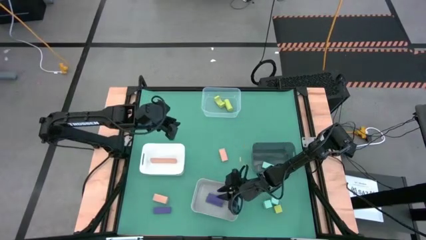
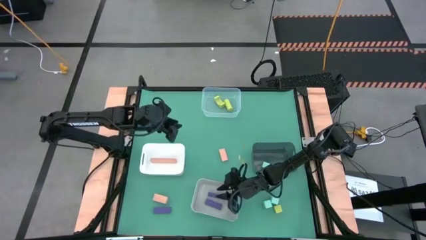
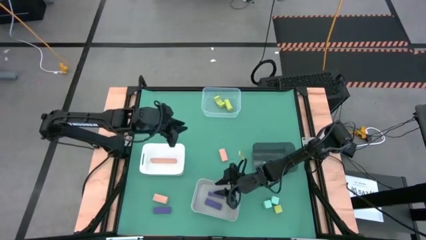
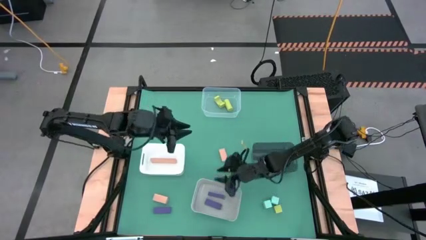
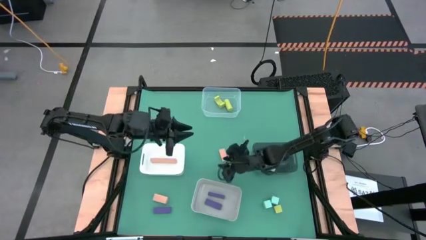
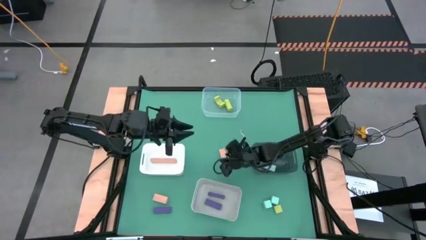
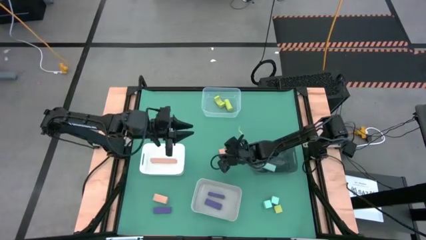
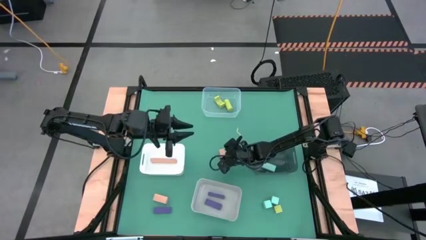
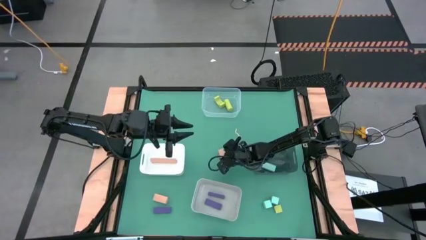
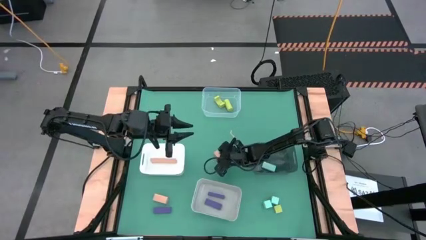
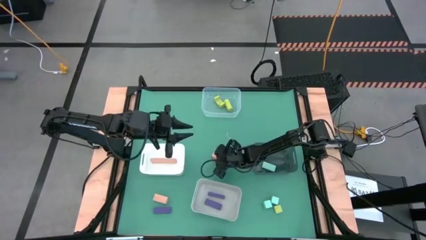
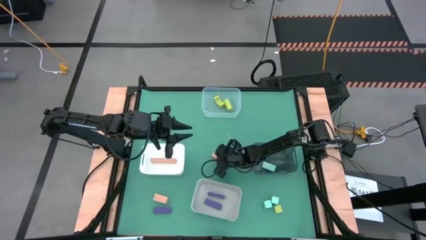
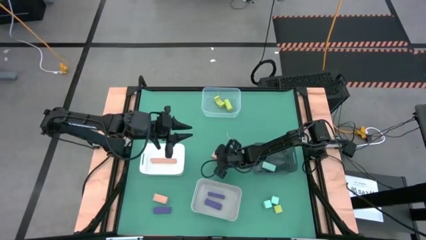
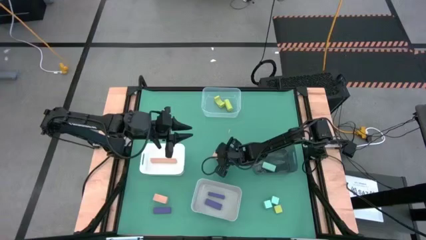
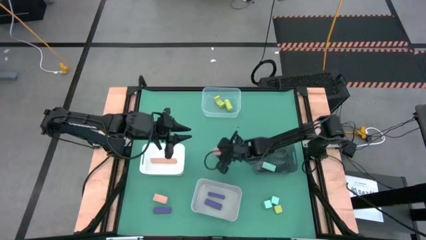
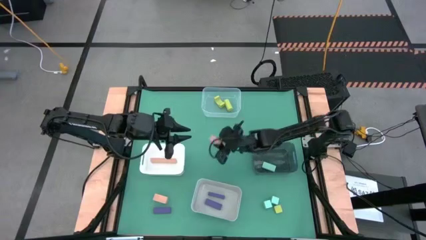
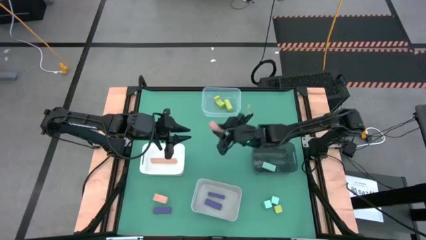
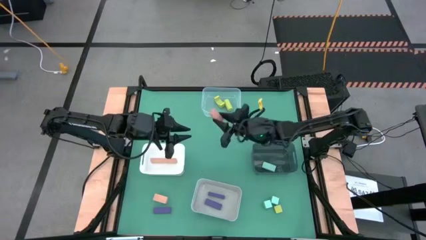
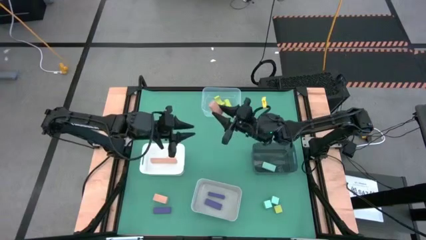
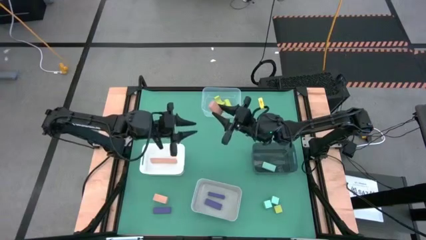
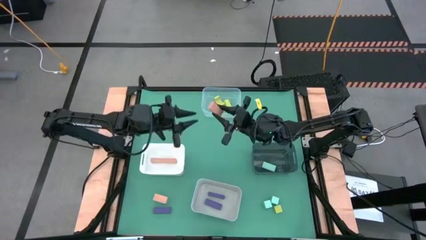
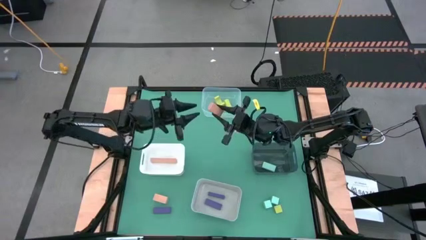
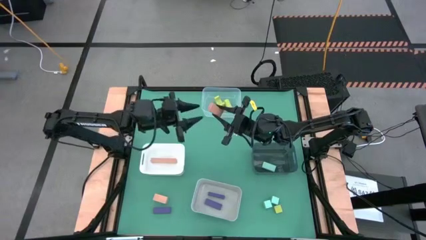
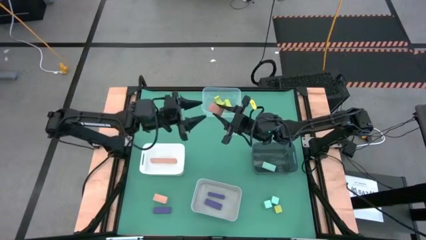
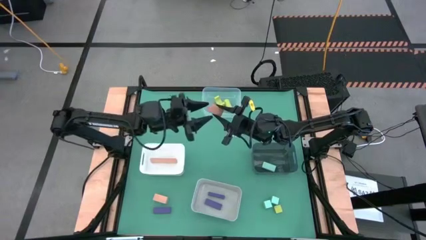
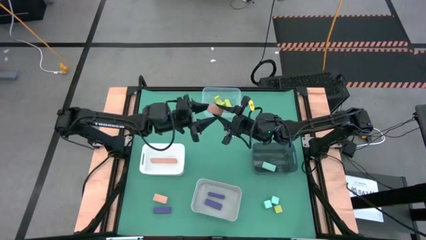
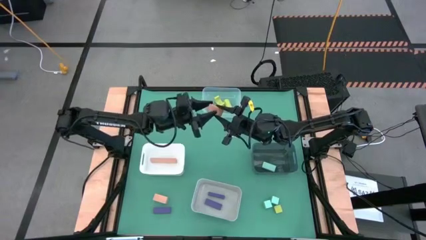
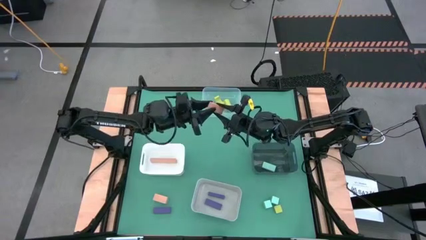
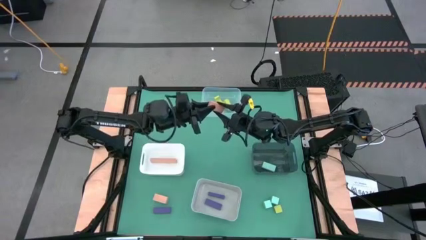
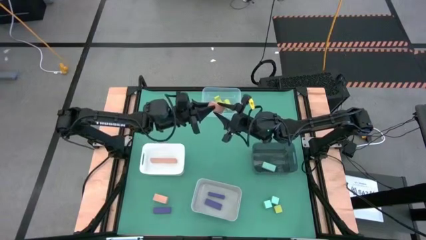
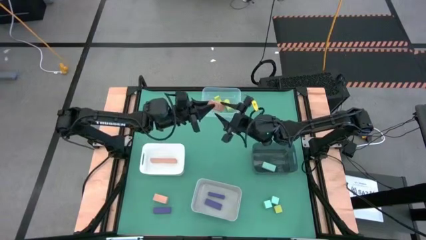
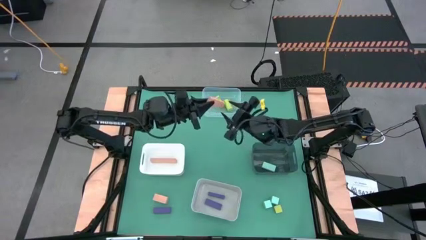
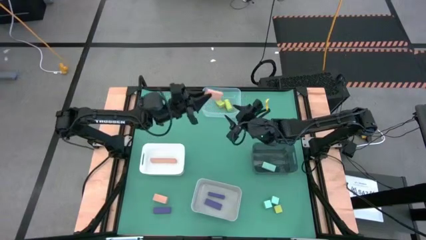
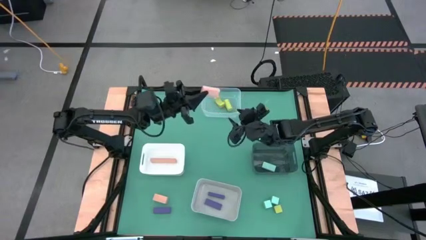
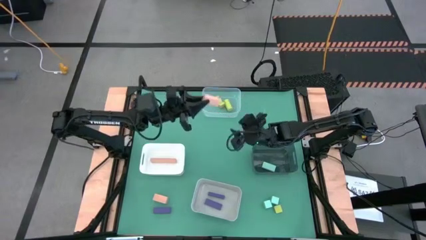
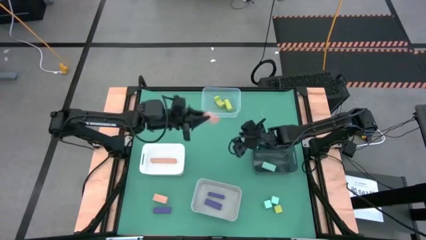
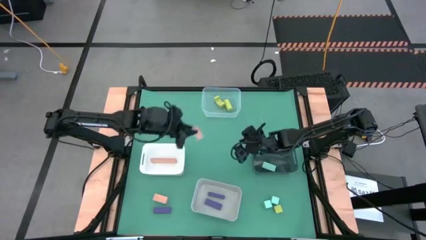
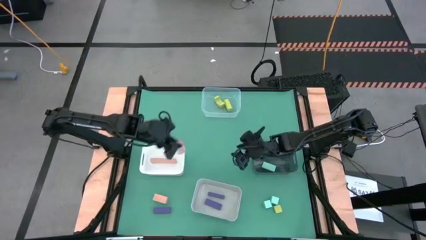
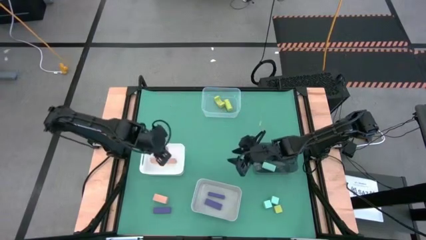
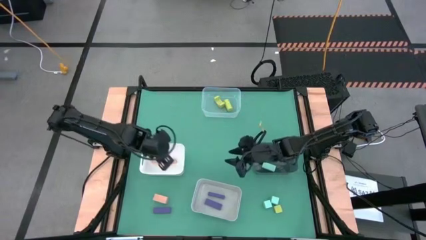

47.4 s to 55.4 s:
Task: Sort & place blocks by color
Put the top light brown block into the white bin

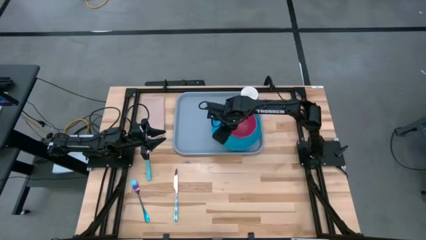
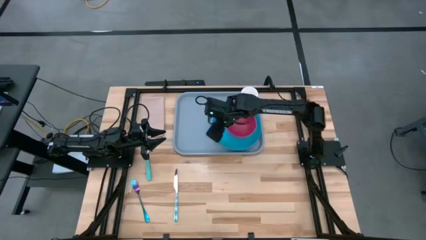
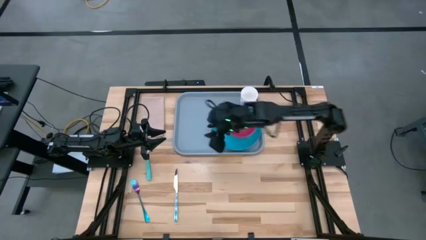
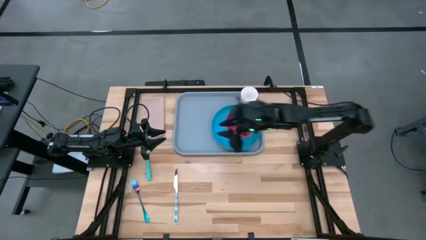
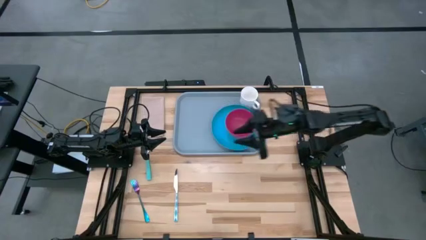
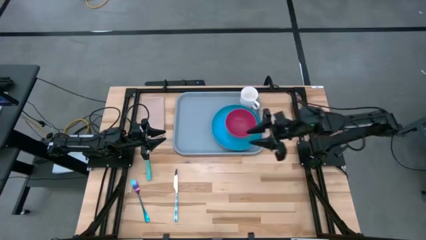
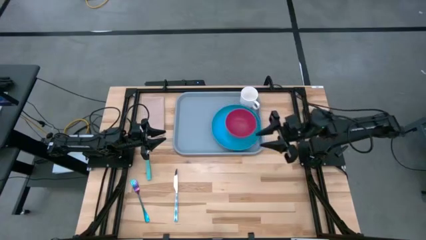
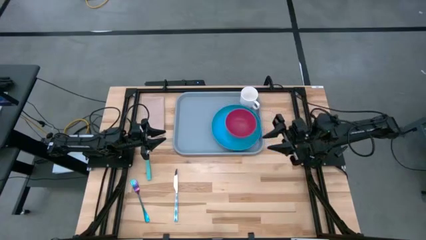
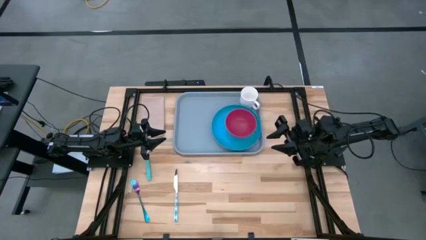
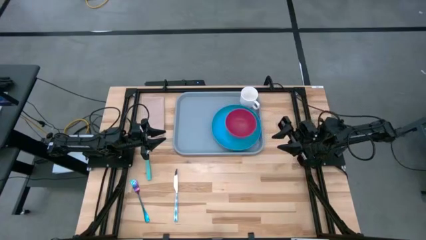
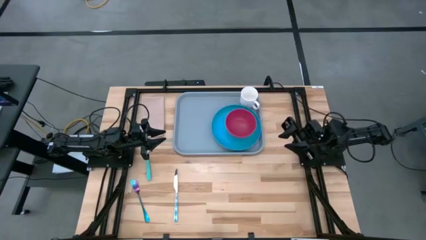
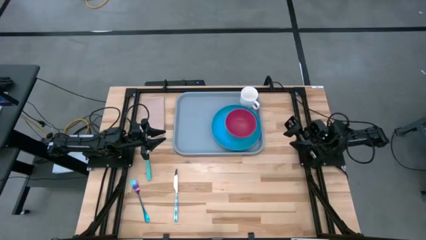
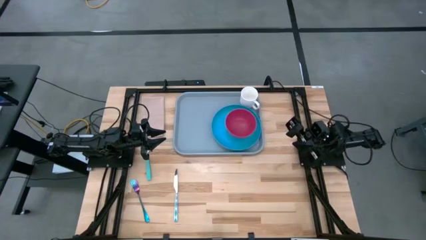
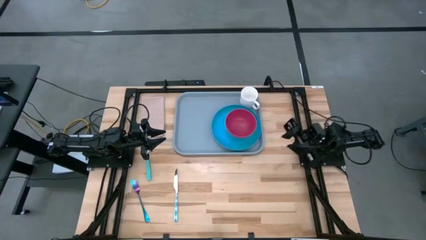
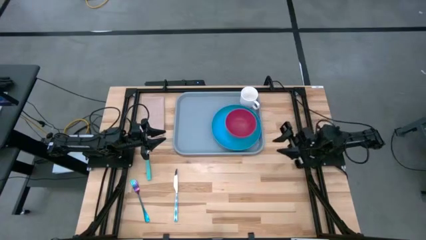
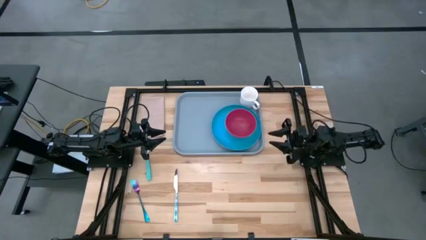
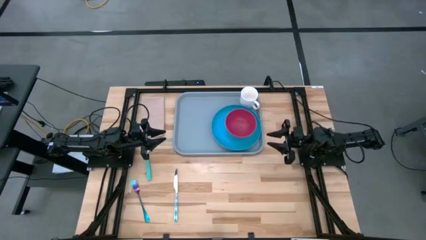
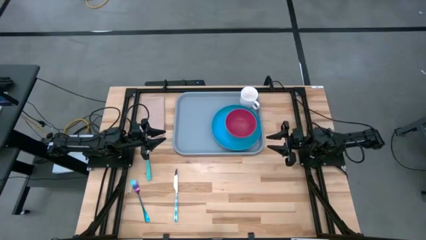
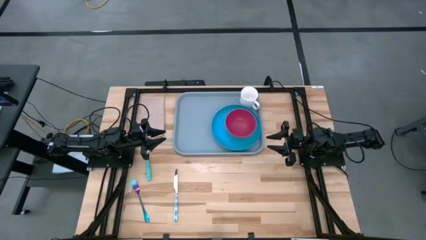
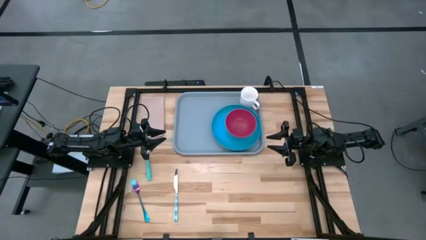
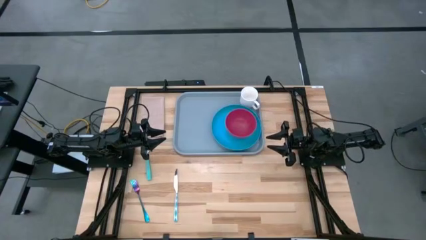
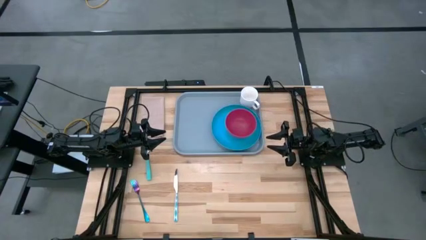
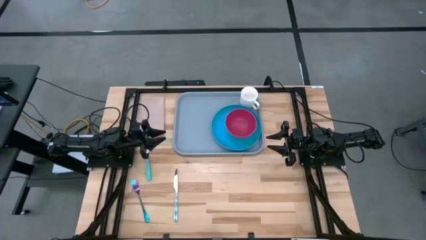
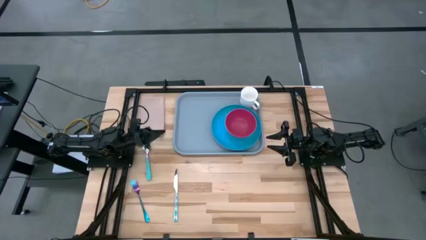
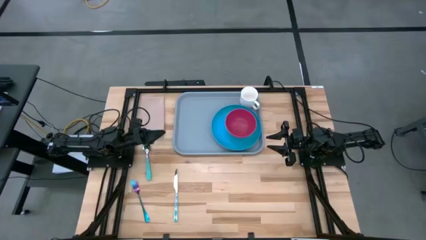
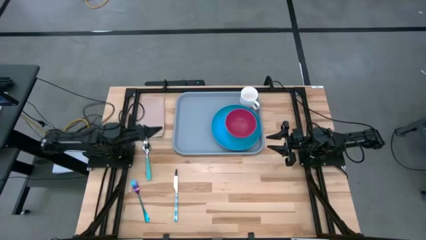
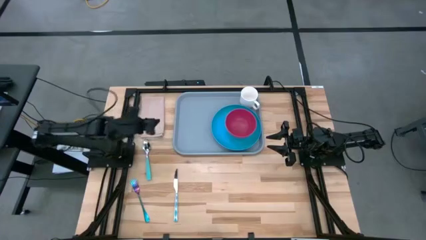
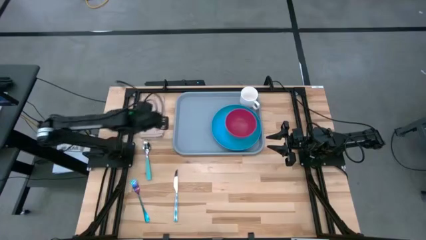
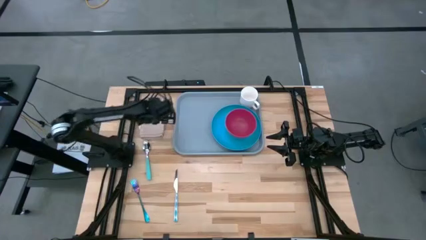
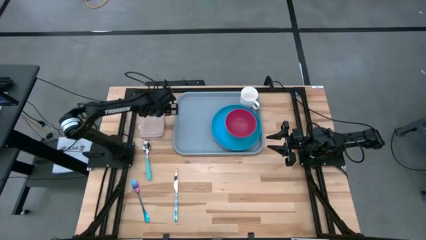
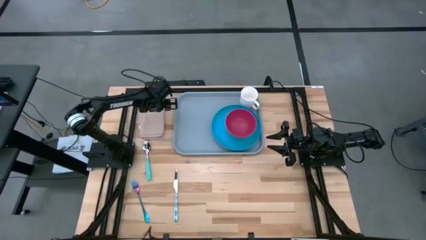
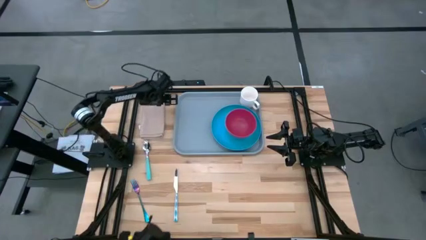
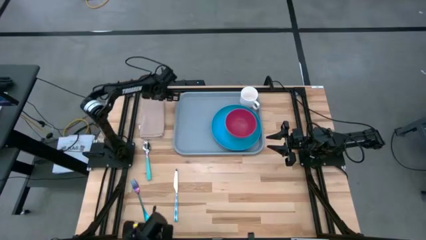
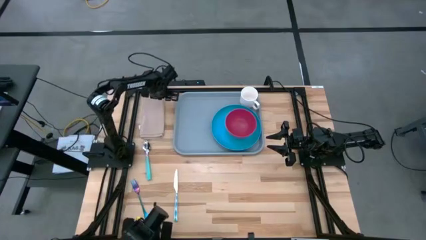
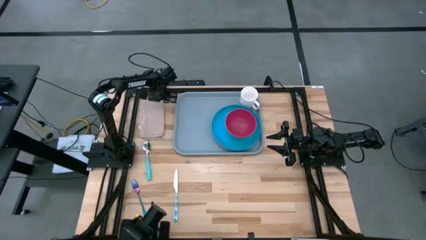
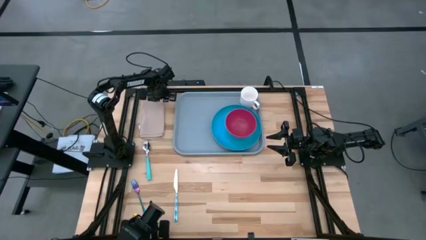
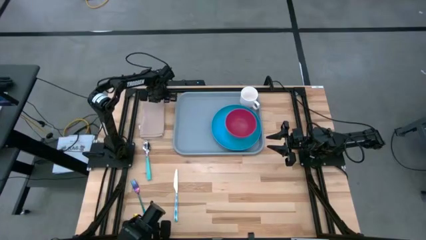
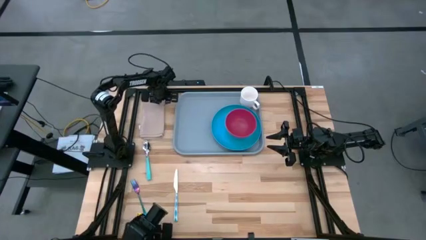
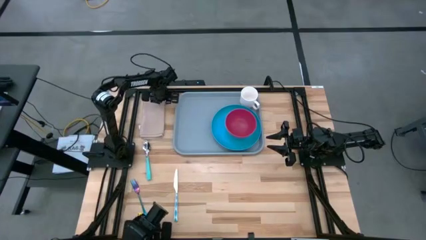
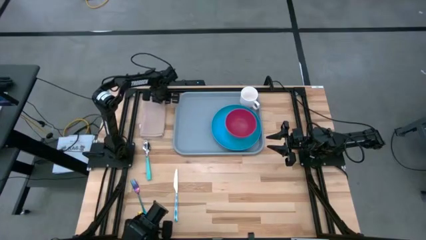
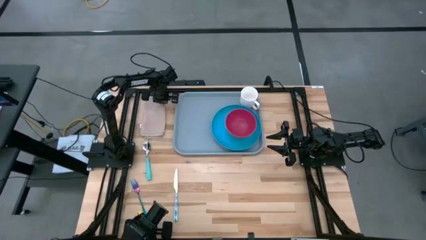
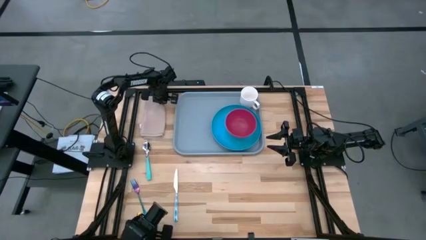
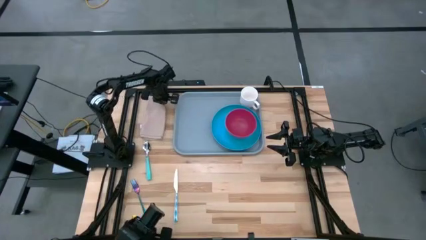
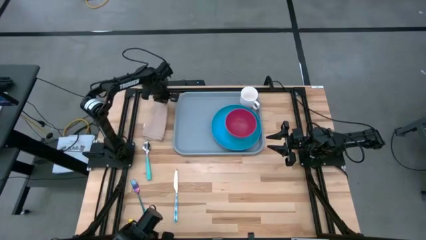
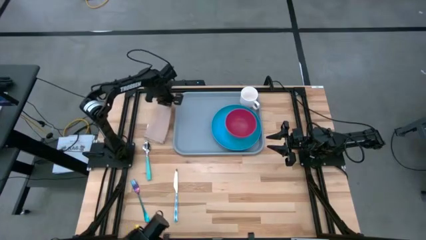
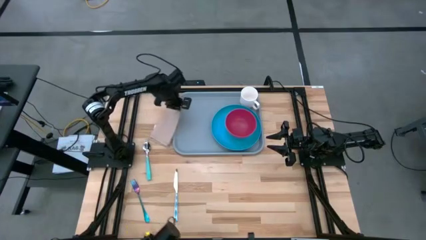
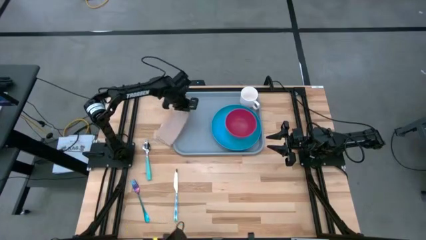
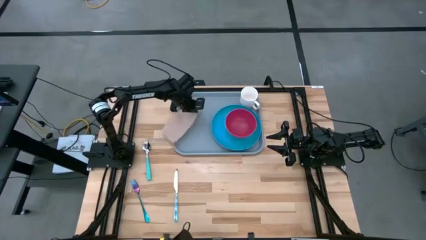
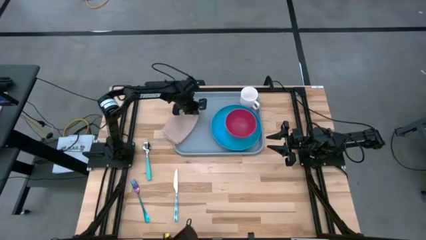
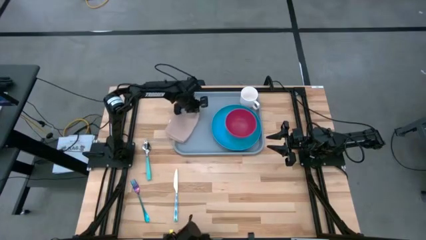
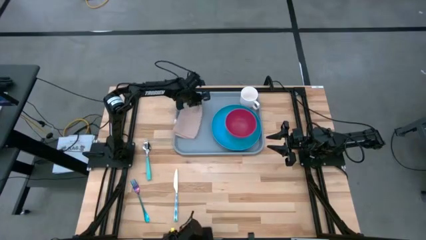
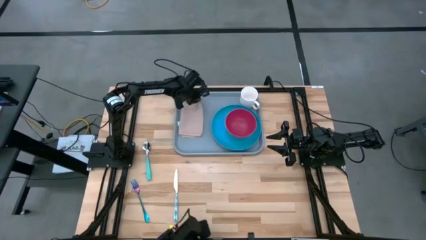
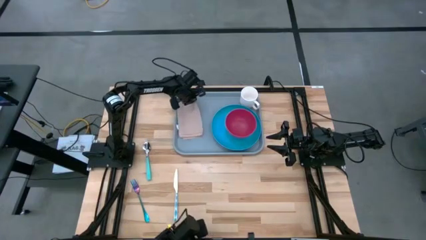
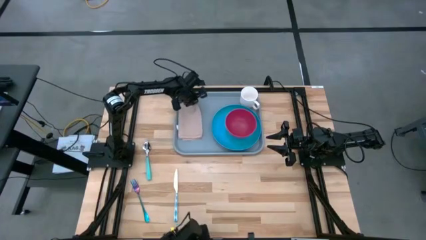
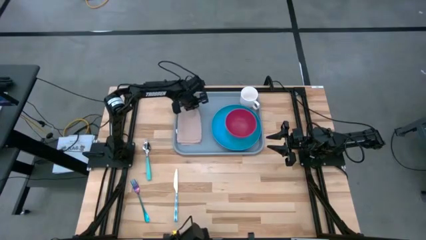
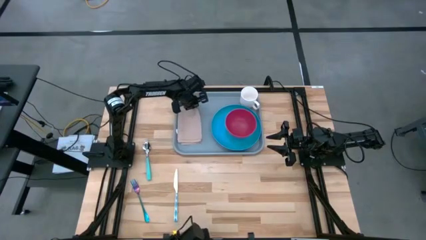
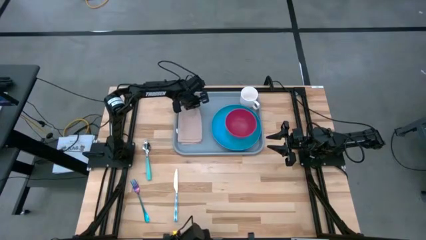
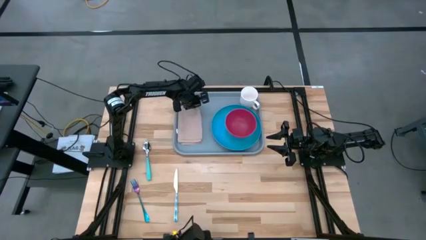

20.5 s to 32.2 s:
Task: Set up tray
Put the pink napkin to the left of the blue plate on the gray serving tray
